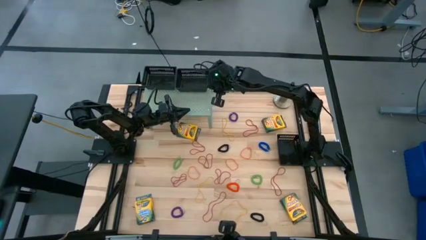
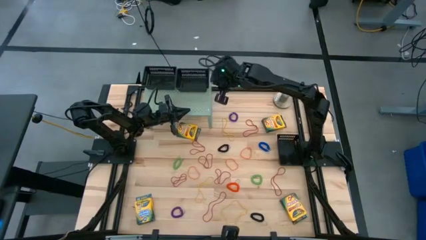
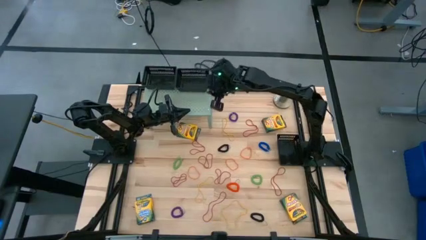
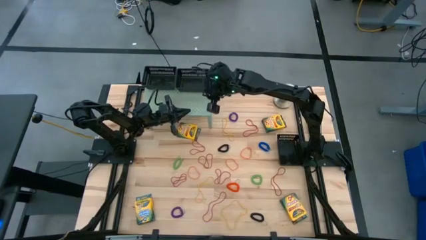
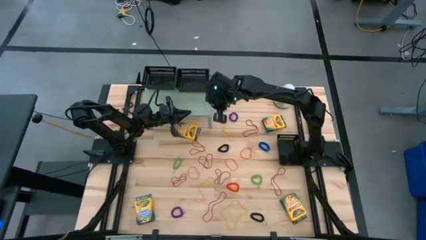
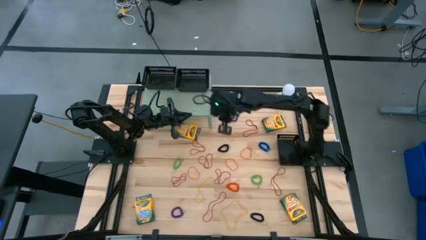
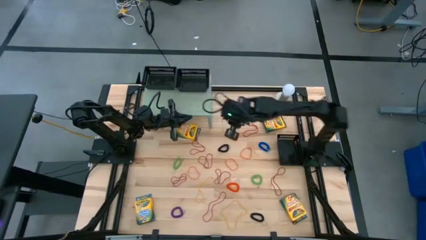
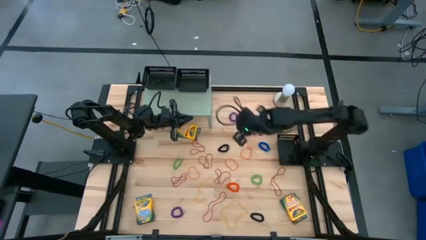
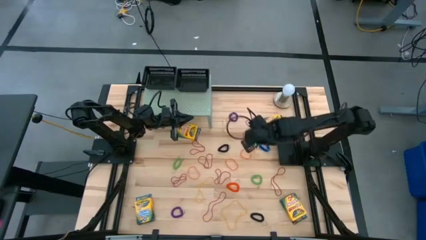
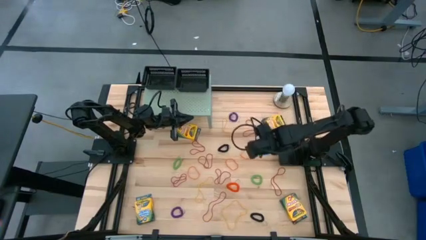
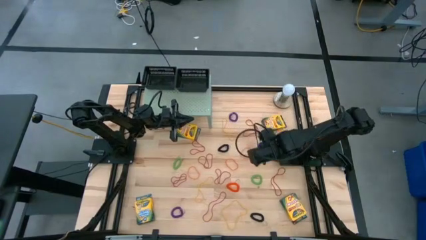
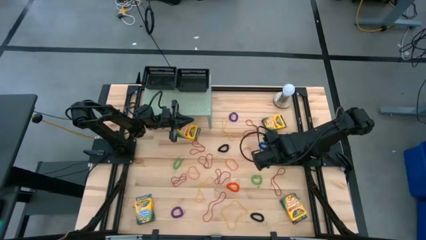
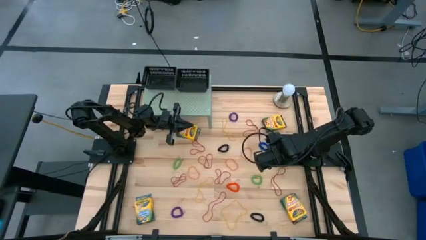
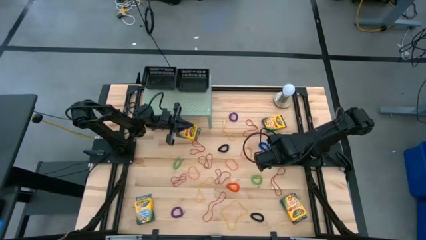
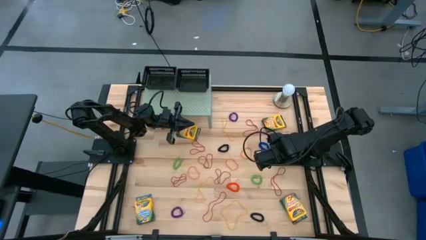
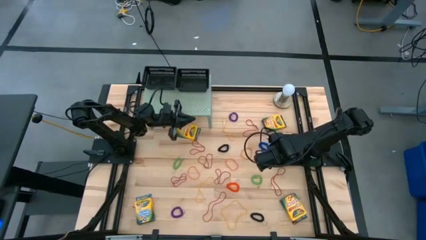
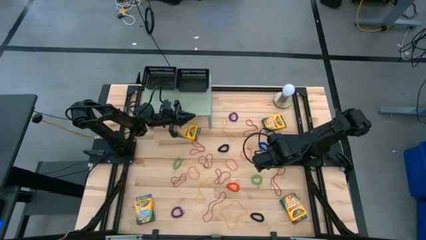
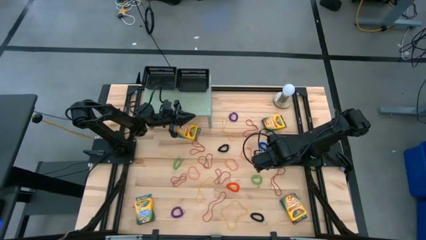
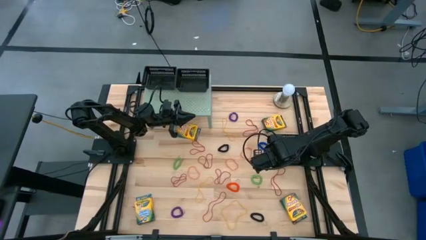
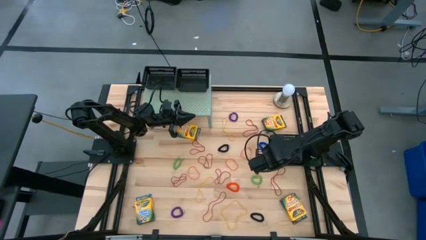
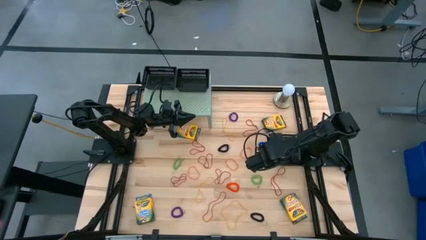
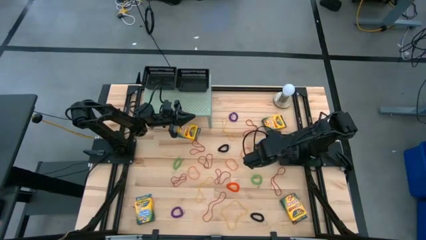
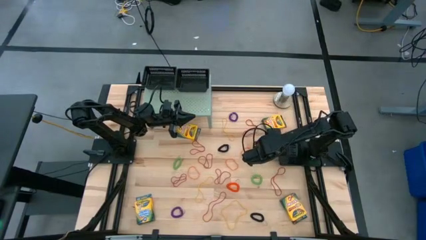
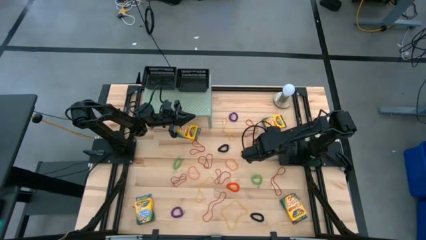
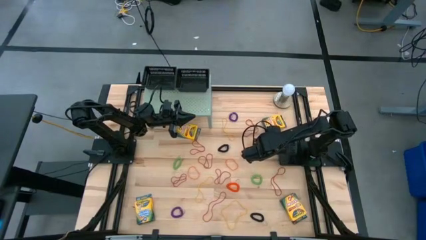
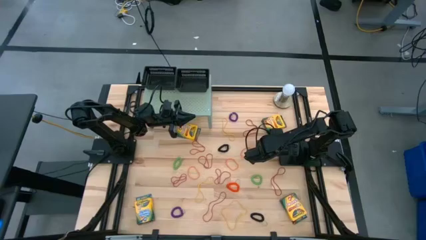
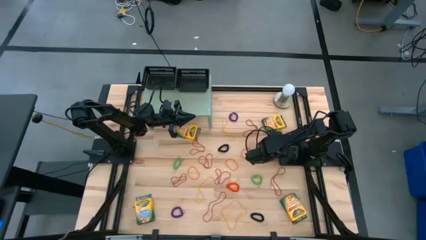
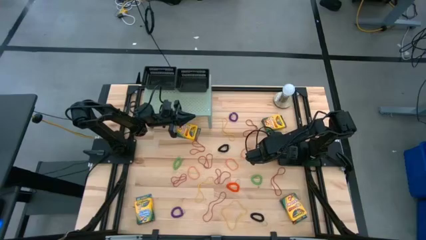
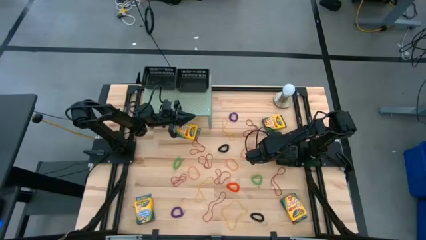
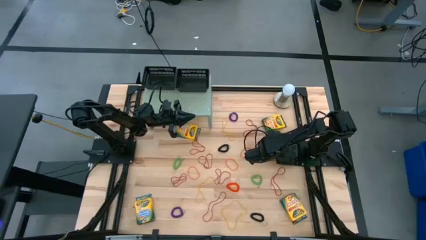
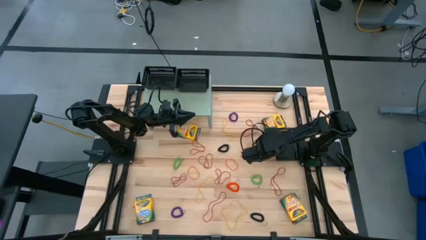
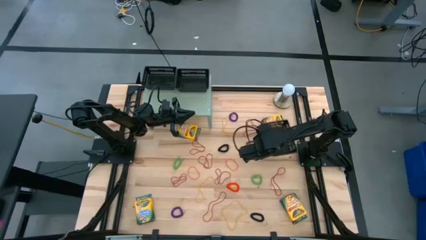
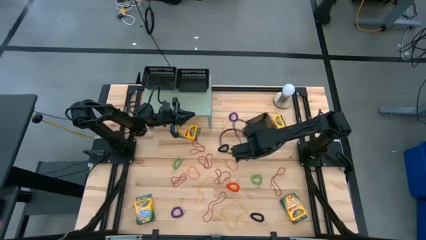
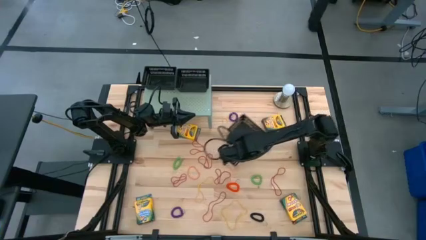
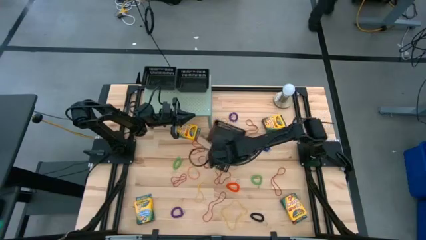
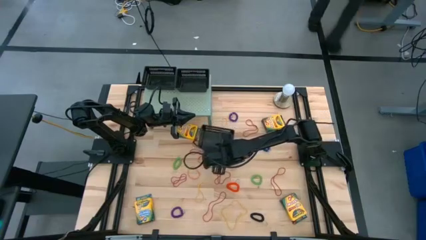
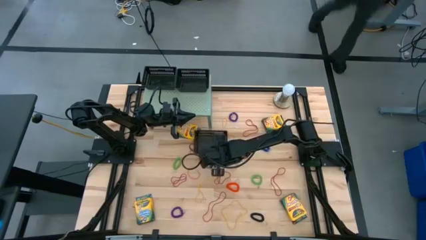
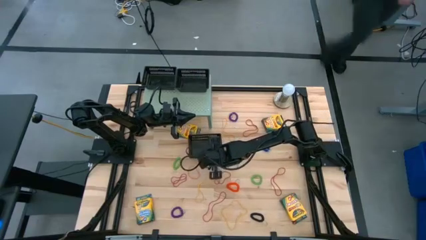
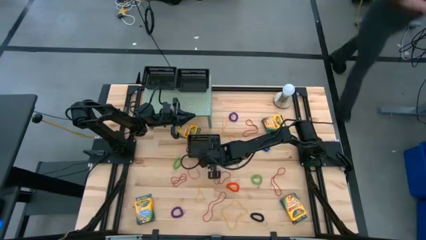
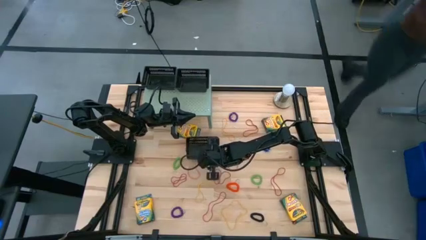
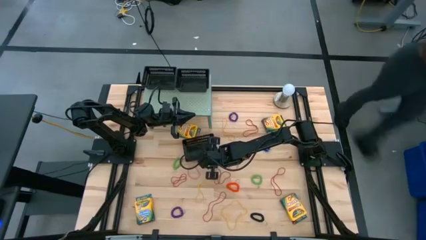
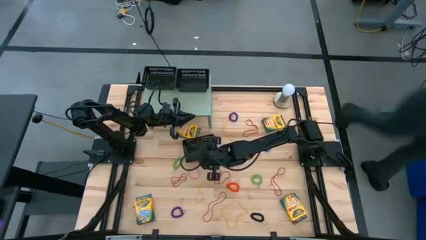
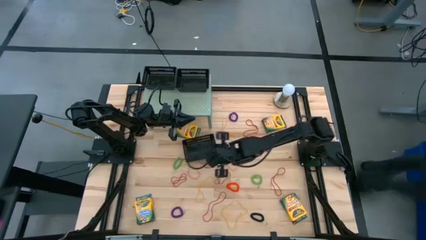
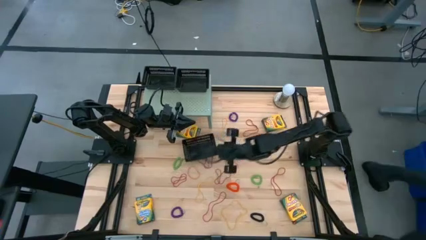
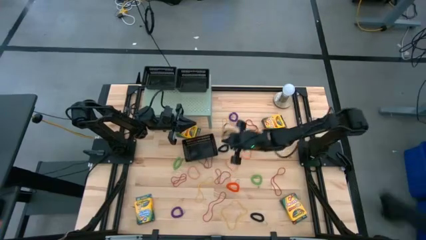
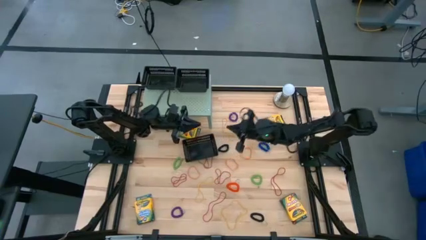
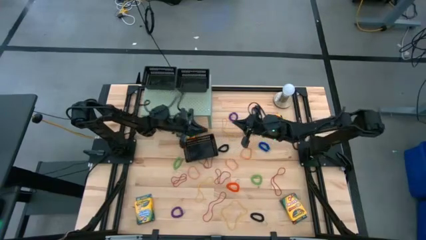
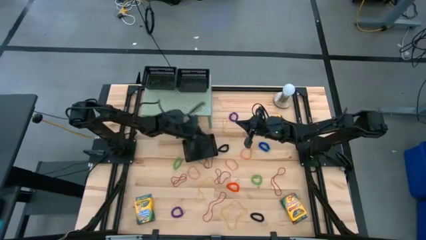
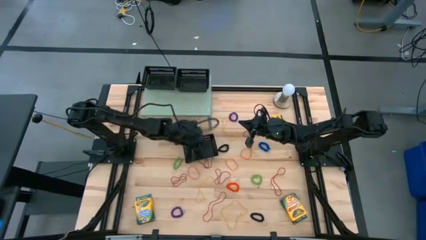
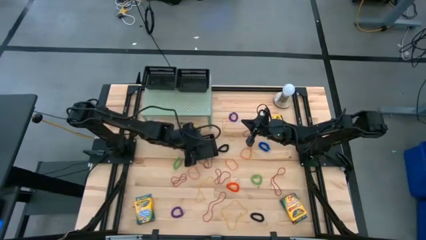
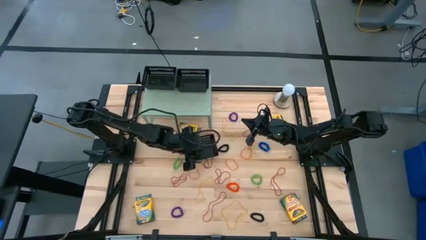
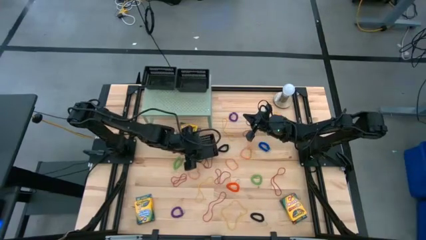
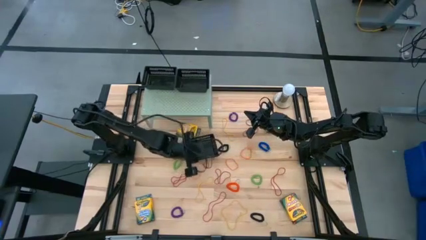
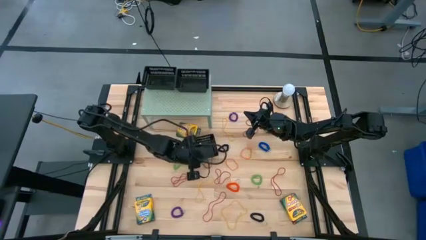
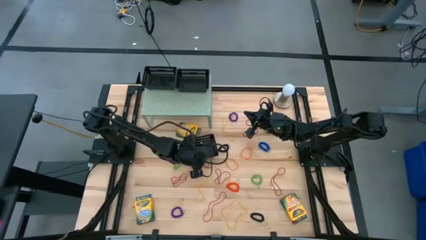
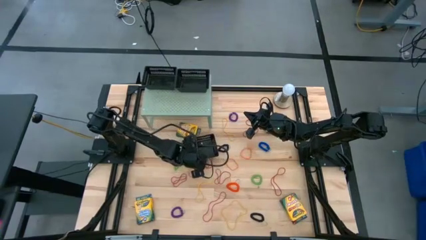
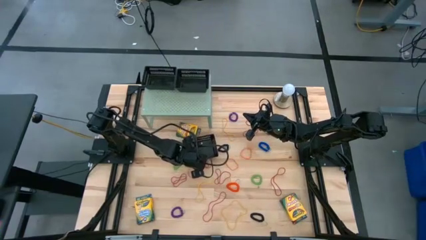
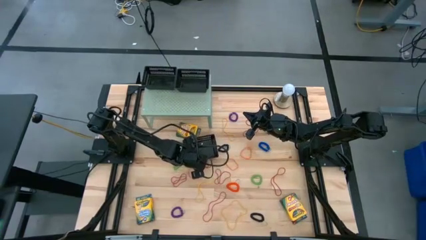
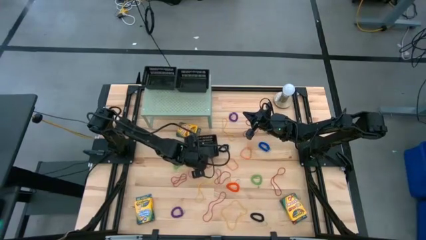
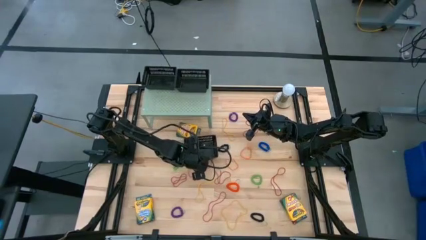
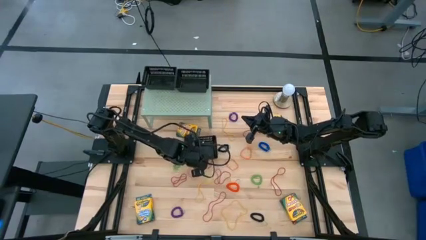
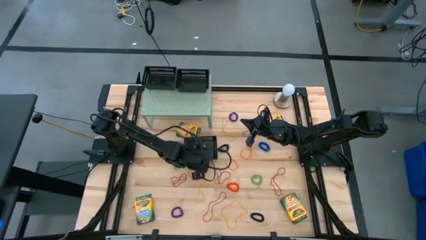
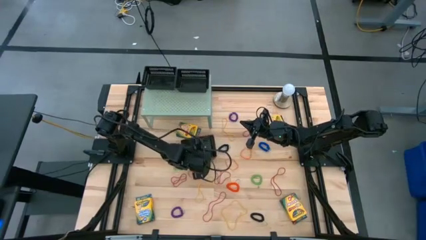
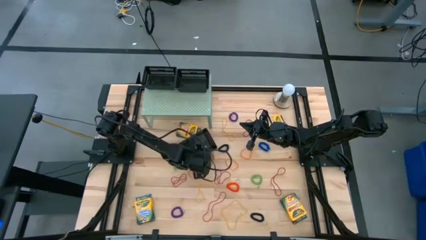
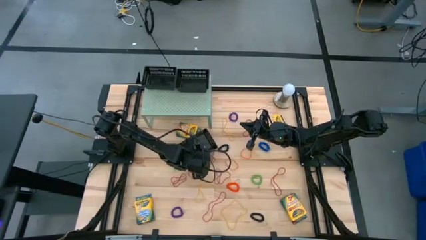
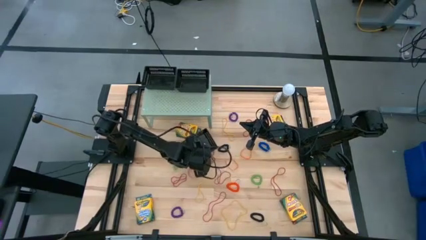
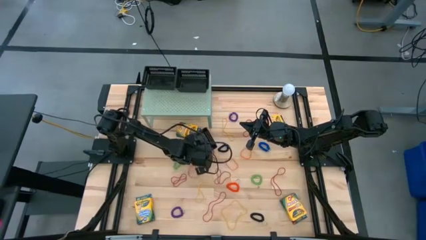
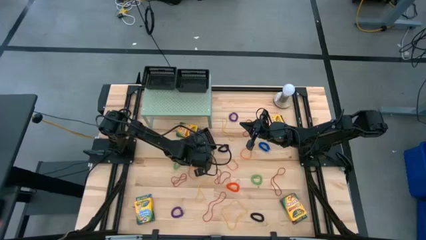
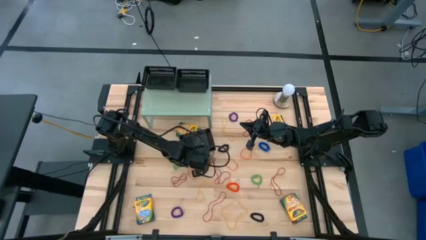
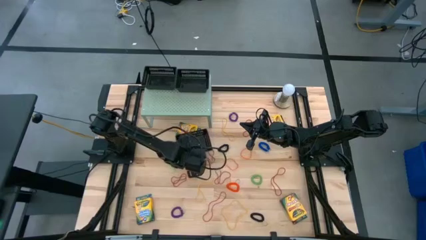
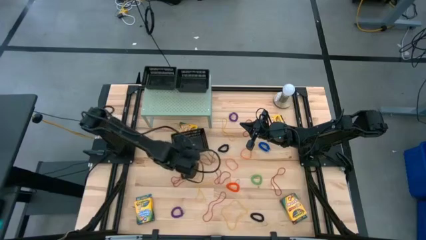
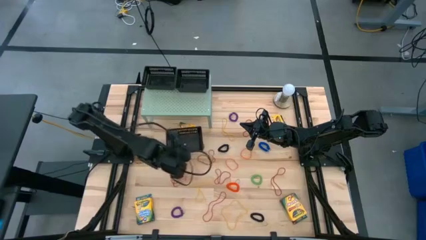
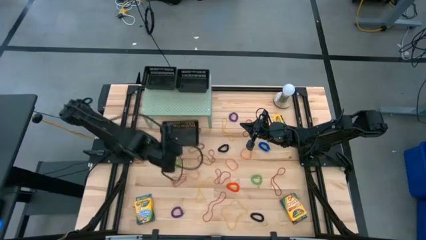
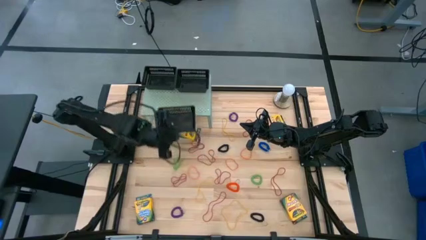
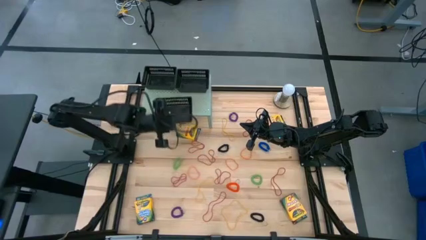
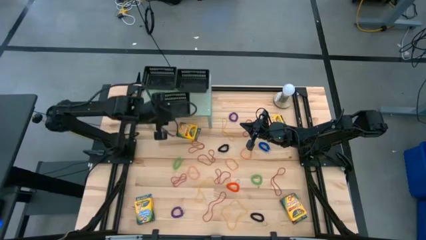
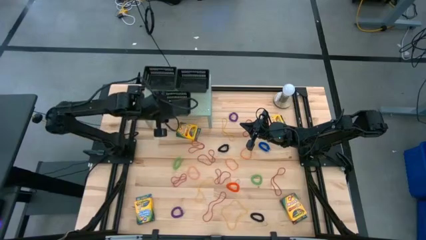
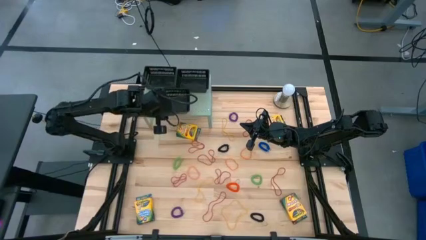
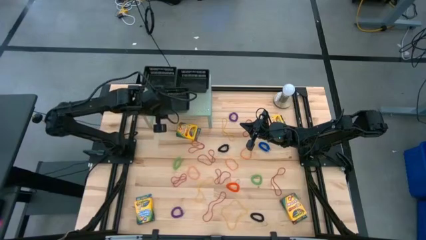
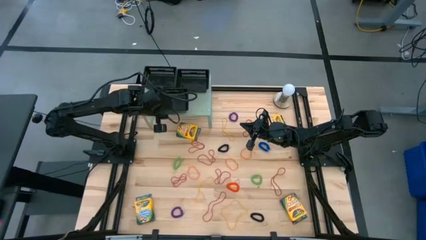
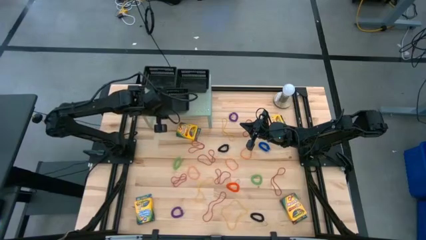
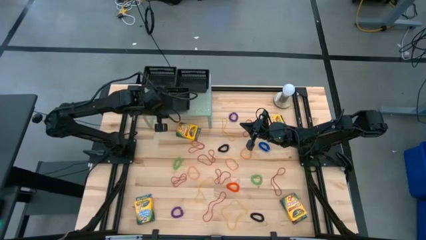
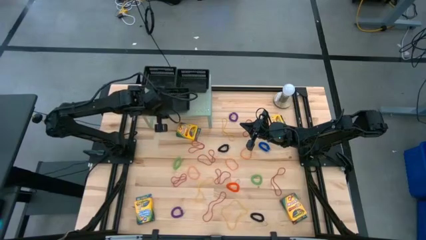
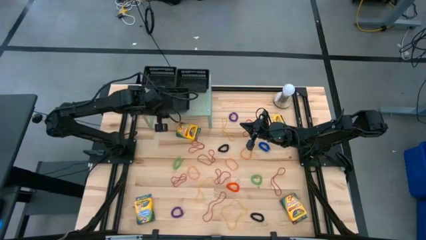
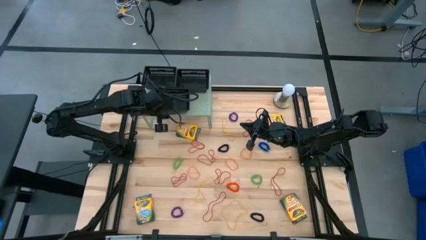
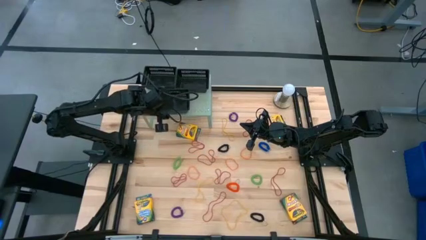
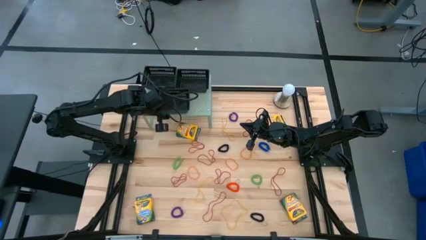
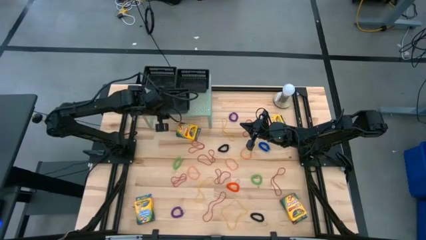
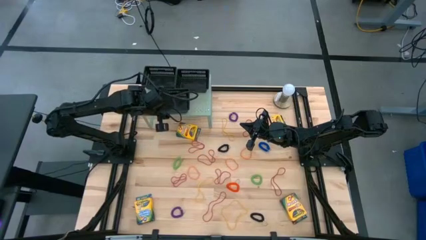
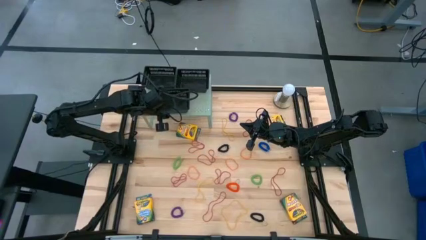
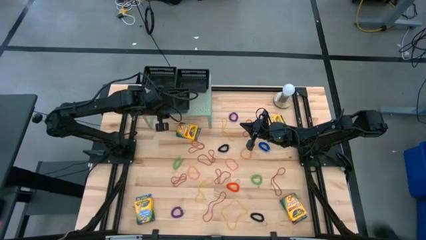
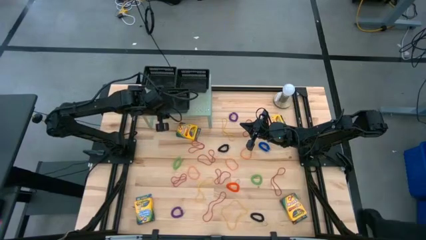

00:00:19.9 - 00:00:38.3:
Task: Pick & Place Office Desk Supplies
Put the black bin on the shelf
